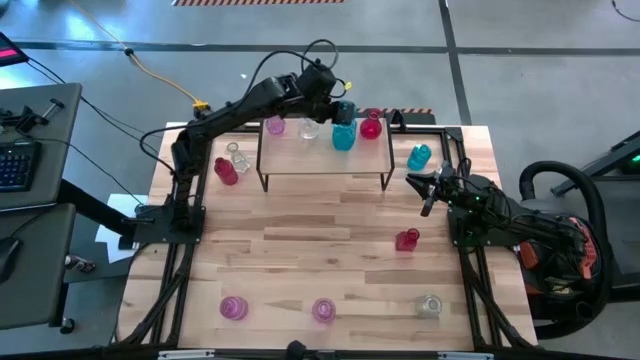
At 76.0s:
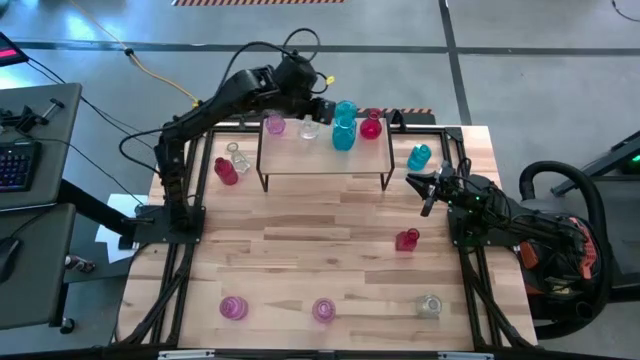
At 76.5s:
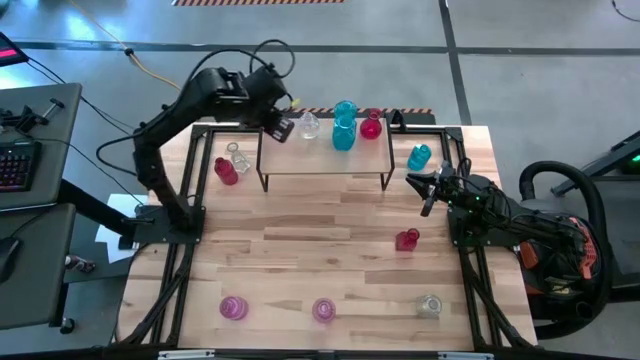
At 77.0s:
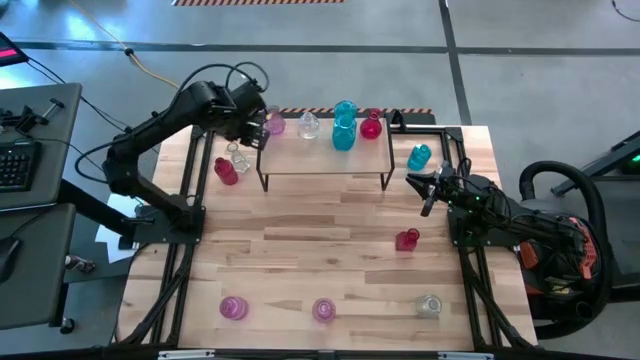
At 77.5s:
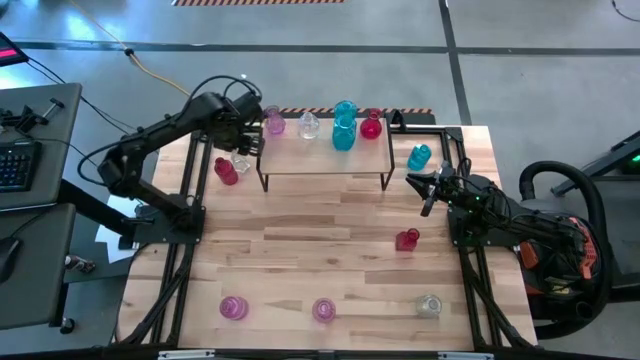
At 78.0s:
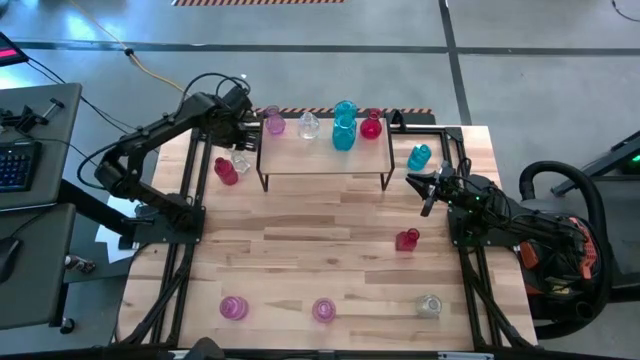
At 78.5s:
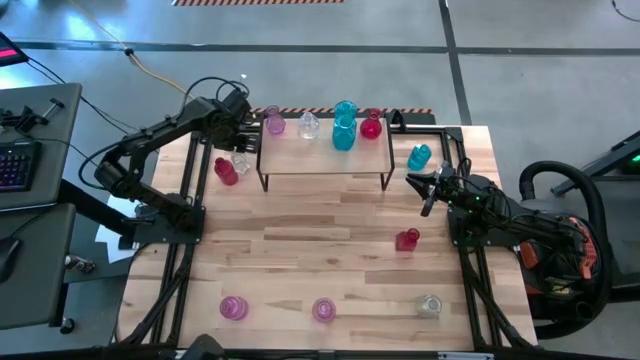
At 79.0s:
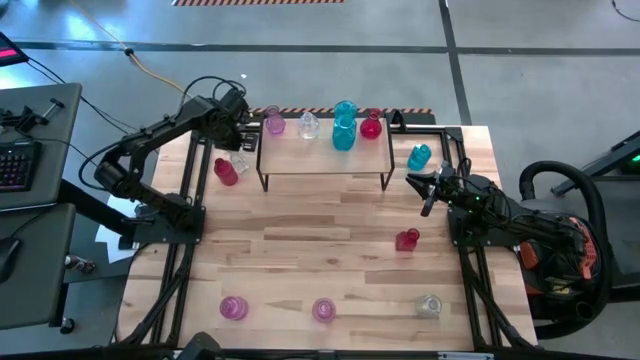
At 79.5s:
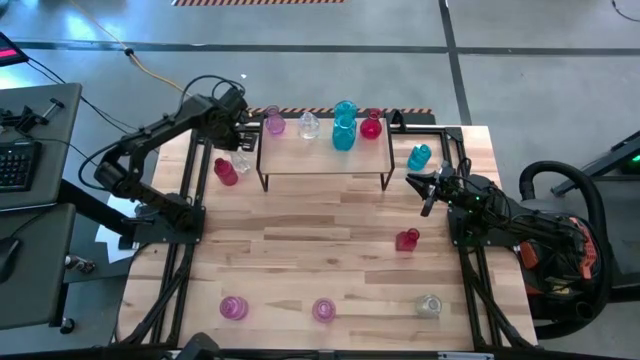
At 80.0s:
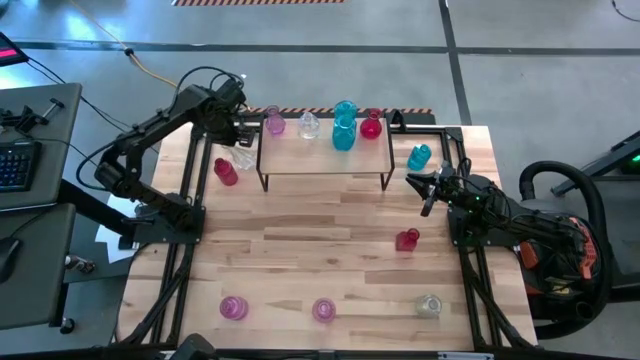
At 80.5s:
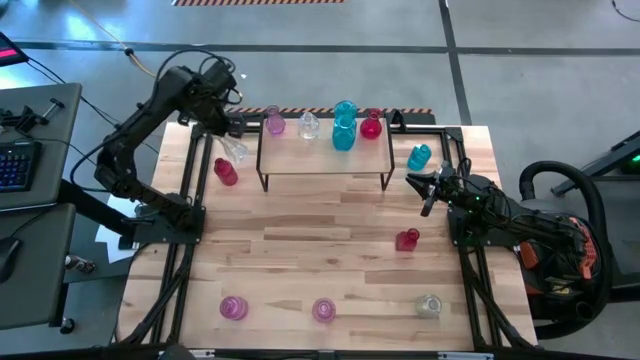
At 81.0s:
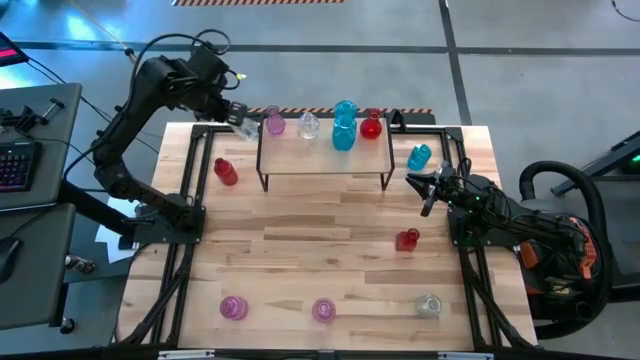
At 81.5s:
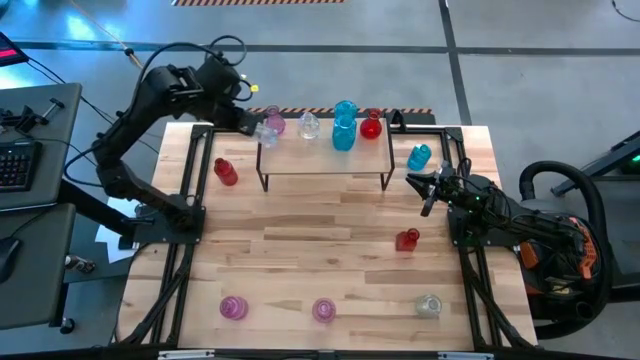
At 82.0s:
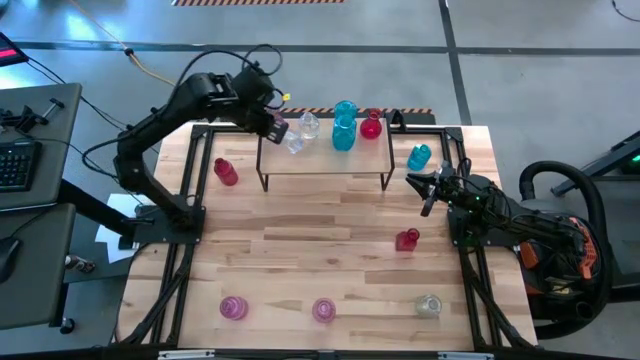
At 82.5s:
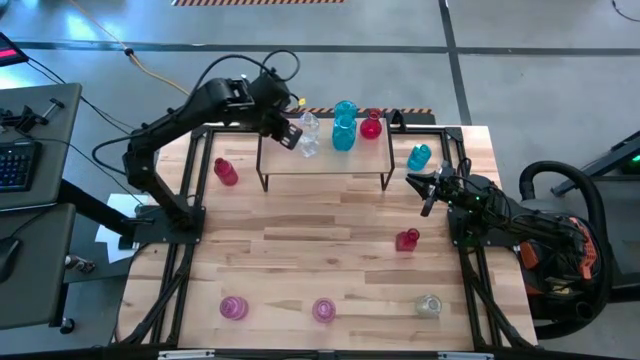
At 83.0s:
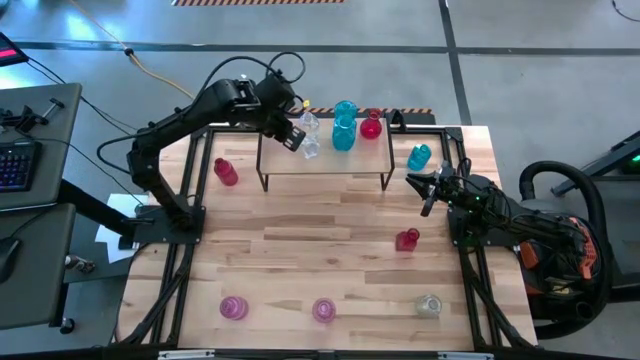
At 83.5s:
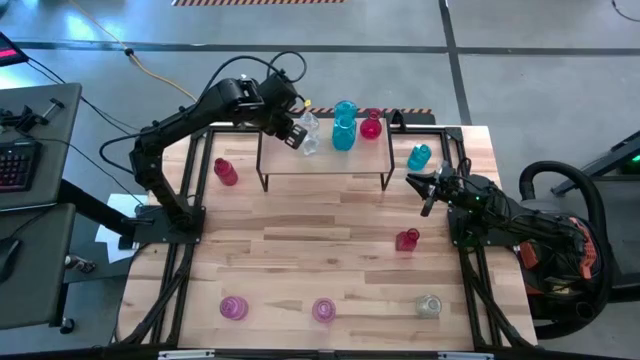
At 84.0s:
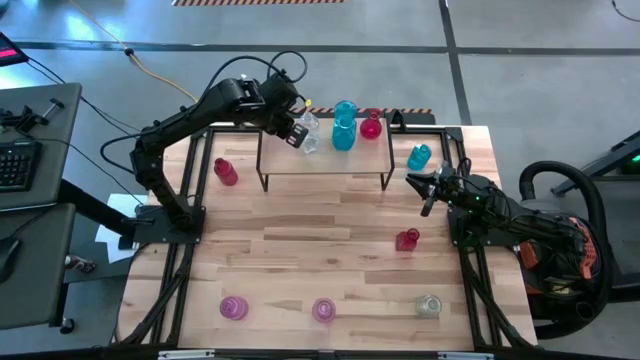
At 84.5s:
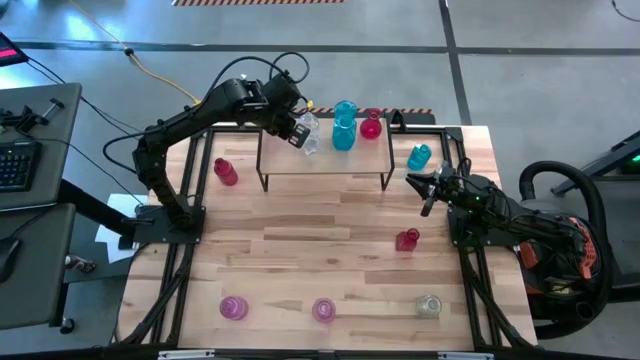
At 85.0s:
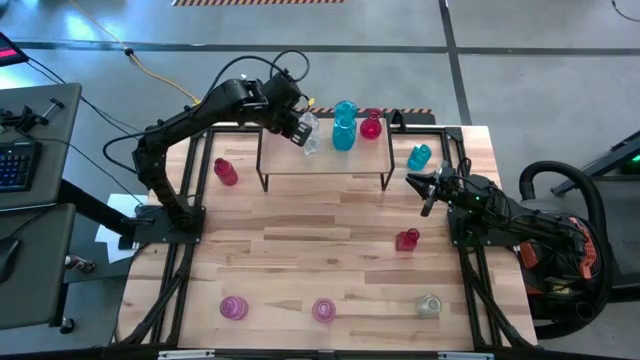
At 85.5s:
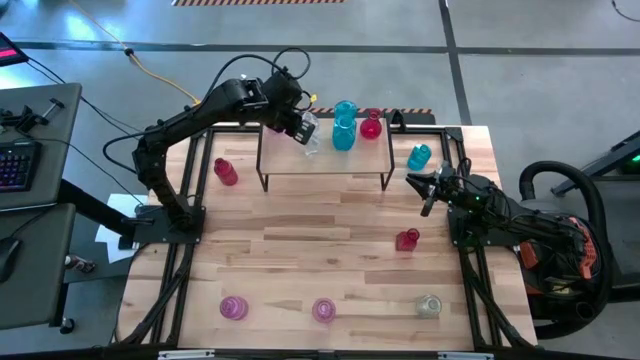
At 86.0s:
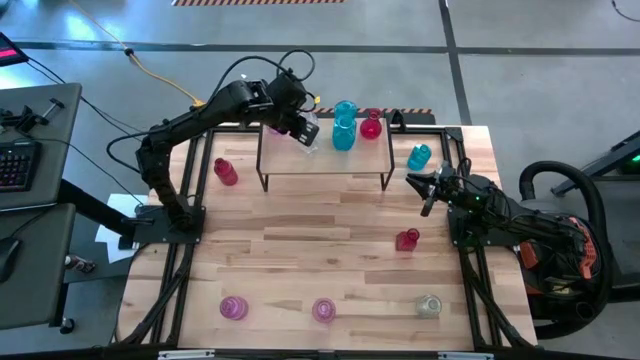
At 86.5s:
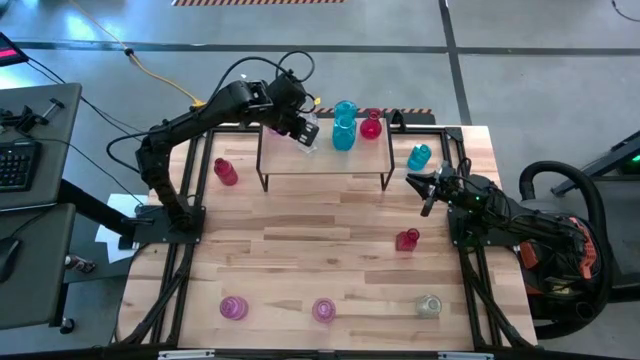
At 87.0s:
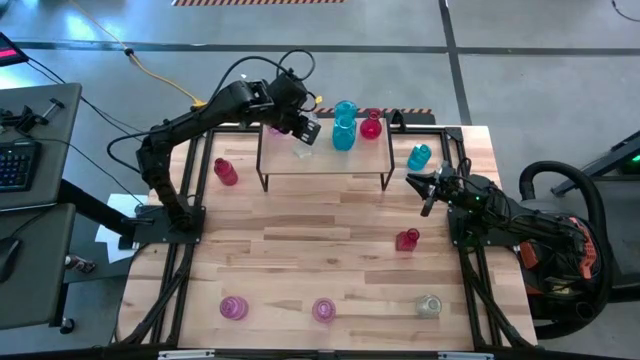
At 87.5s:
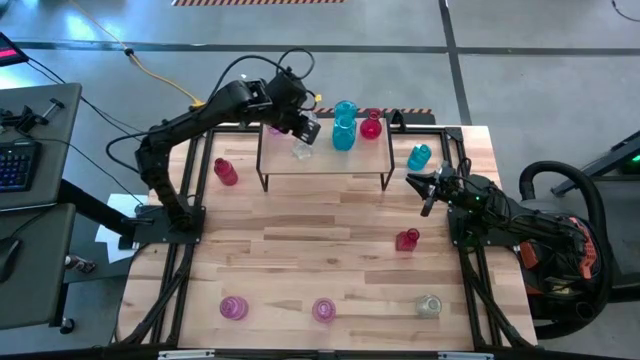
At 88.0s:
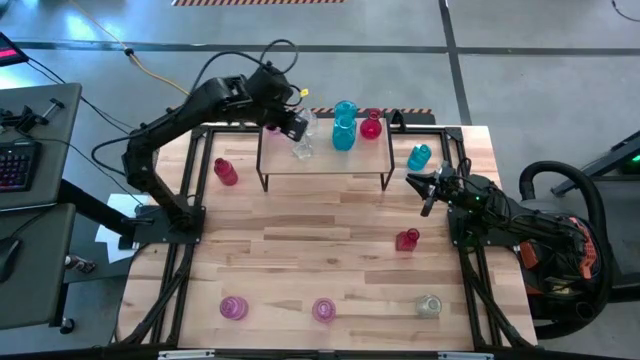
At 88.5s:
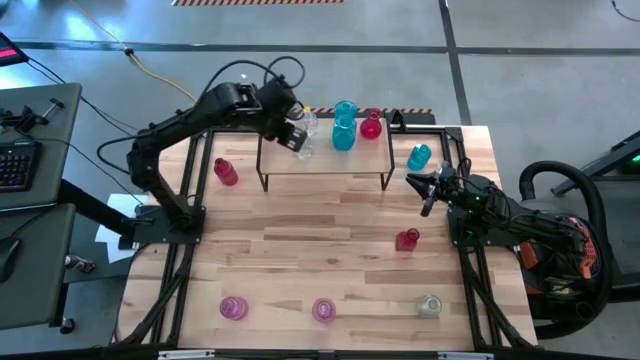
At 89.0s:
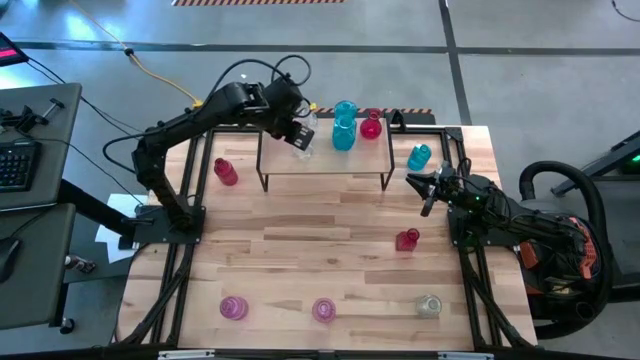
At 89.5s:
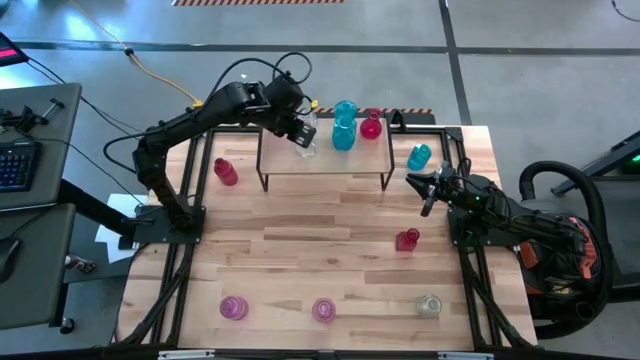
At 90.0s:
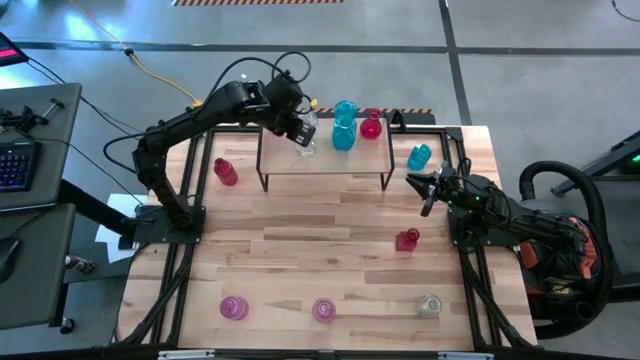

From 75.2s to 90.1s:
Task: sort vases onto shelf
Put the top transparent vase on the shelf aligned with the other transparent vase

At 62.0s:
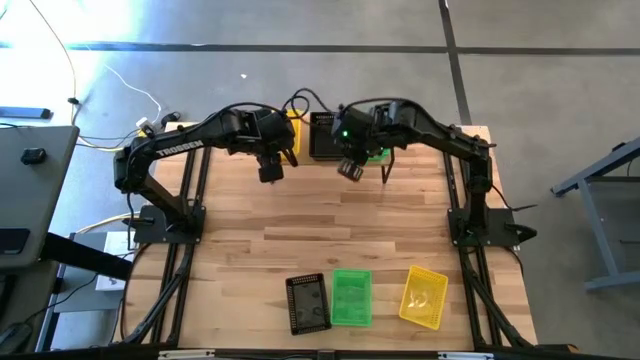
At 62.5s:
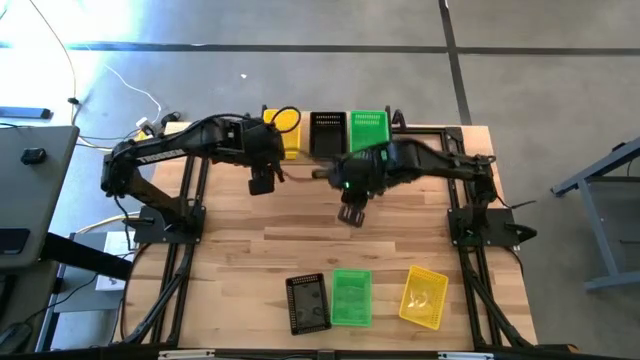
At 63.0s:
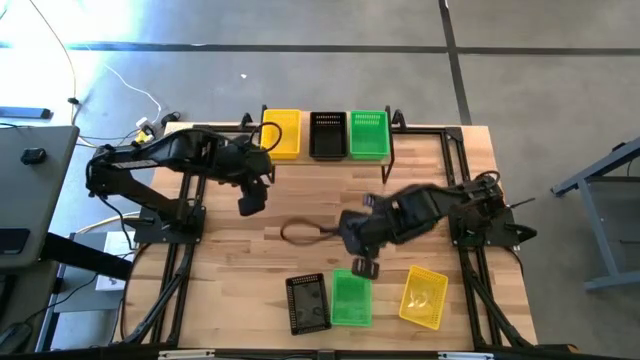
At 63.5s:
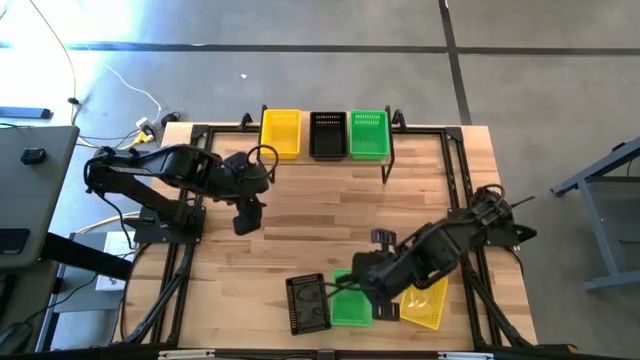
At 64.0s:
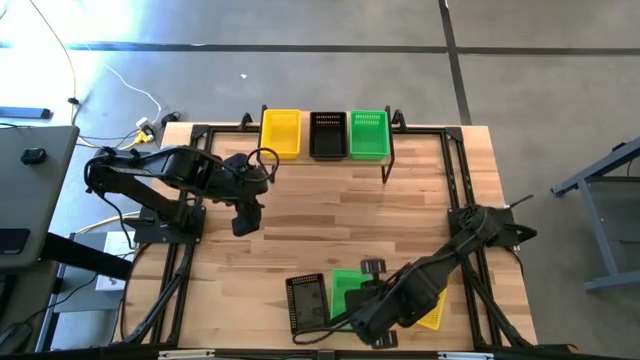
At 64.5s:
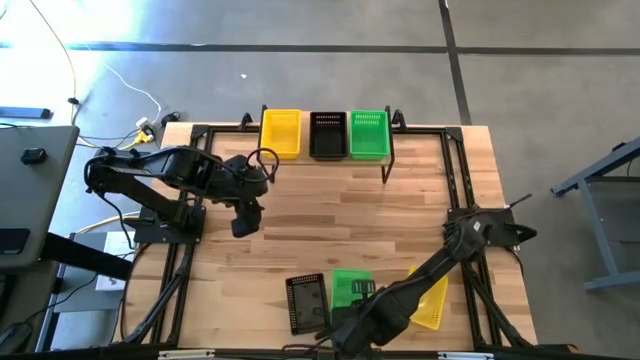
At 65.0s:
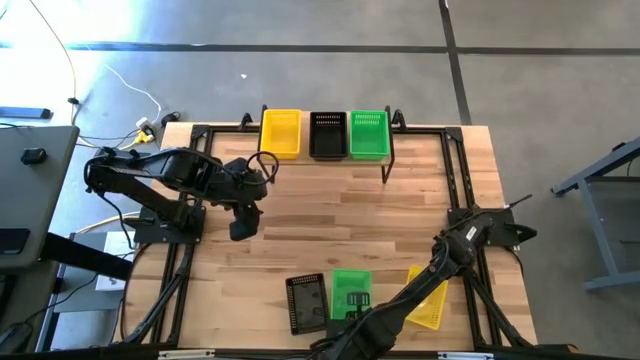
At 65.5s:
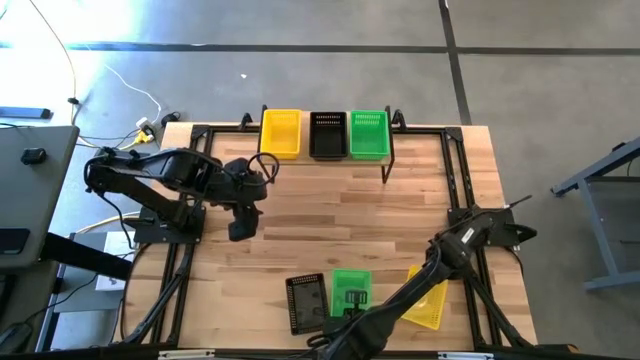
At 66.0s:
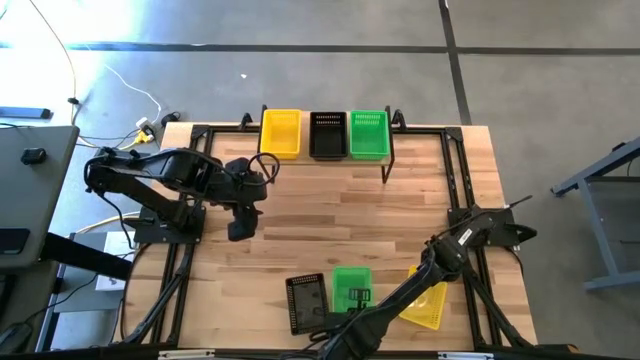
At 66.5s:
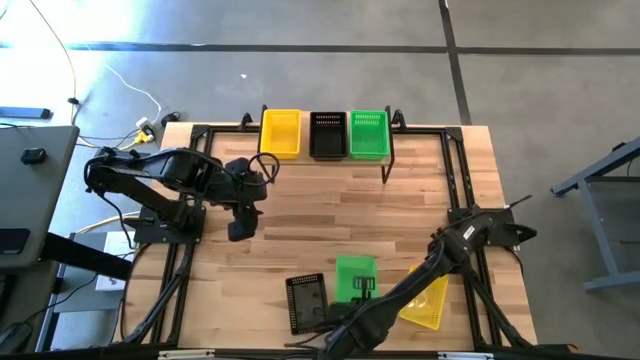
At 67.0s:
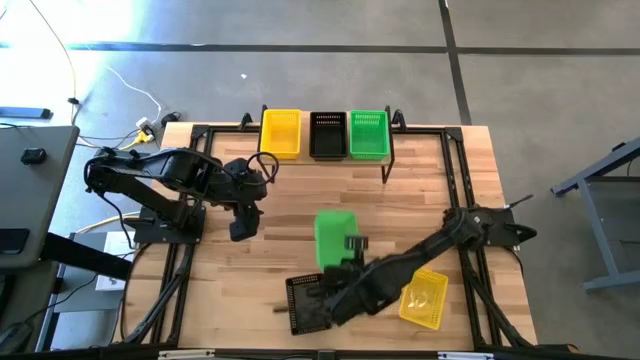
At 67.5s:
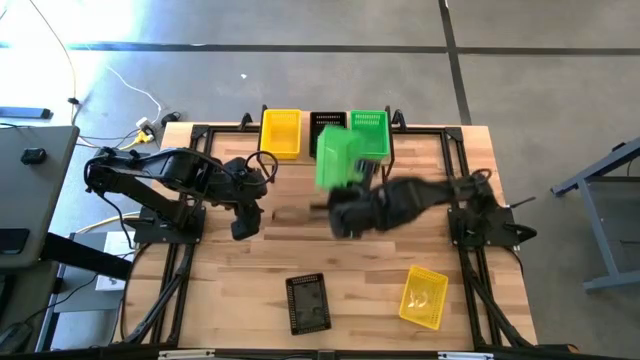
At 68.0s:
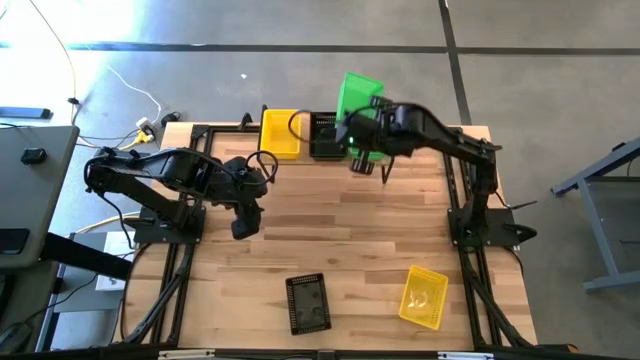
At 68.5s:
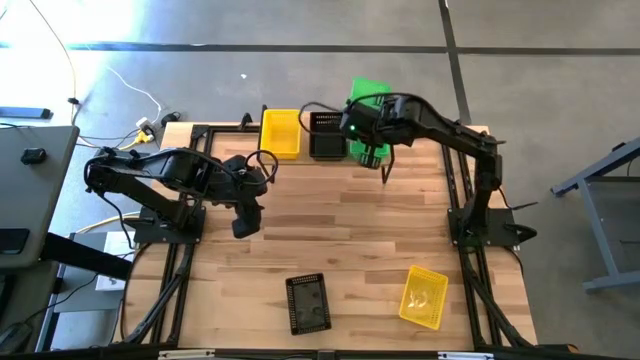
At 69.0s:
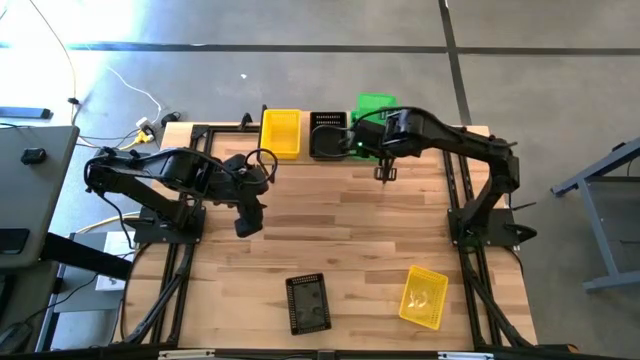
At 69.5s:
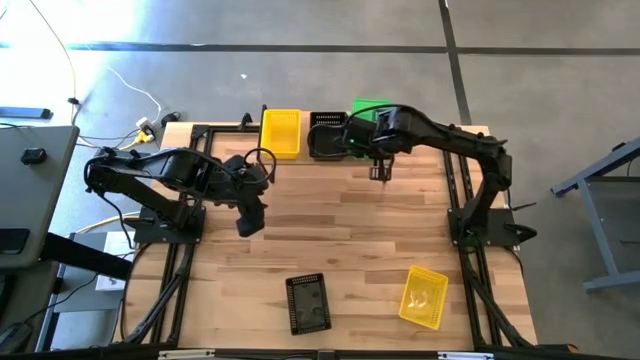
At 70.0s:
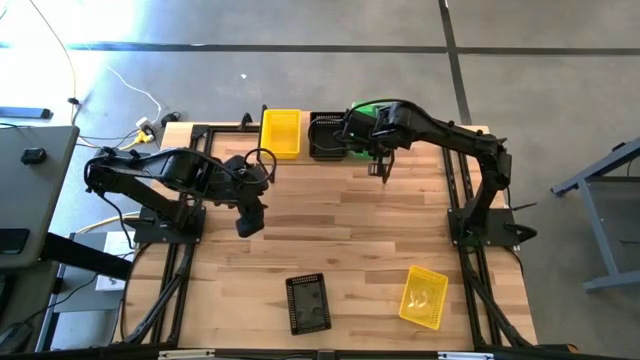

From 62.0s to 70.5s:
Task: Stack baskets on shelf by color
Stack the green bin on the other stacked green bins on the shelf
